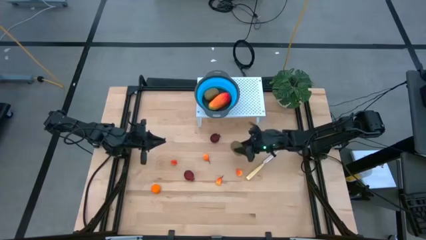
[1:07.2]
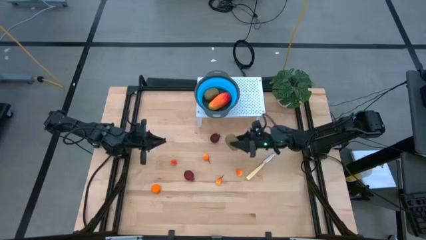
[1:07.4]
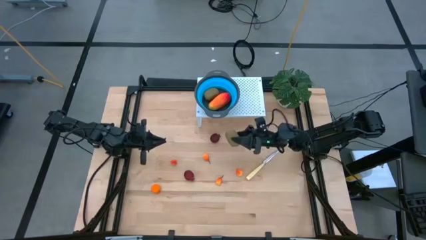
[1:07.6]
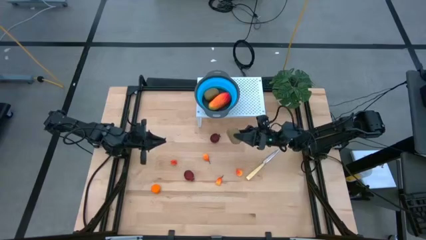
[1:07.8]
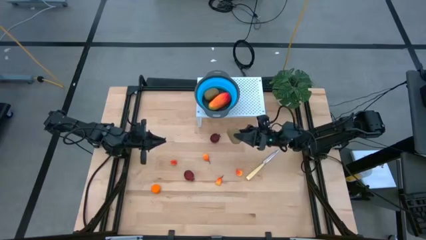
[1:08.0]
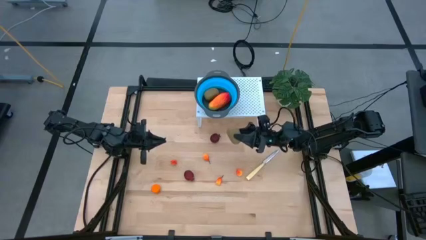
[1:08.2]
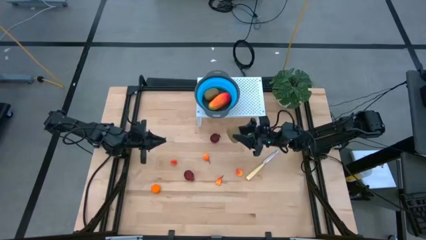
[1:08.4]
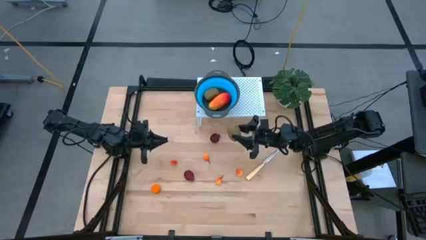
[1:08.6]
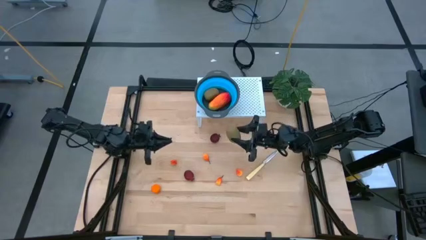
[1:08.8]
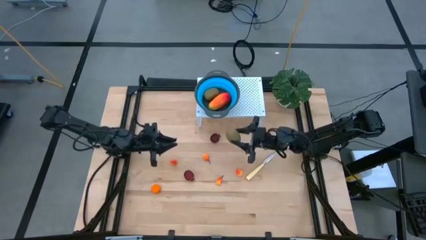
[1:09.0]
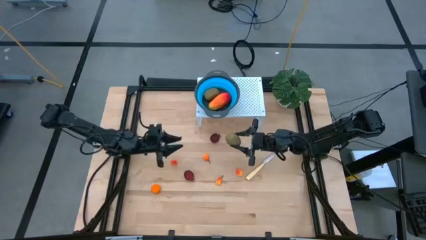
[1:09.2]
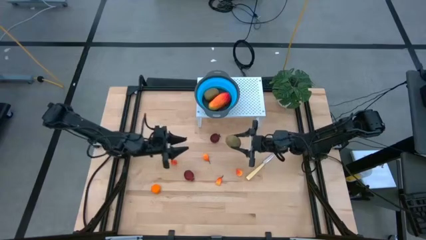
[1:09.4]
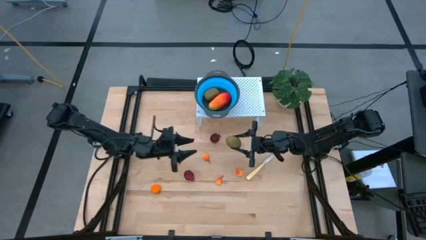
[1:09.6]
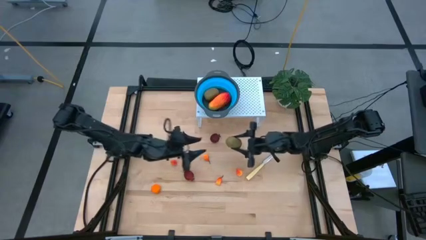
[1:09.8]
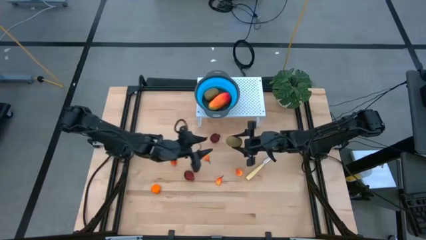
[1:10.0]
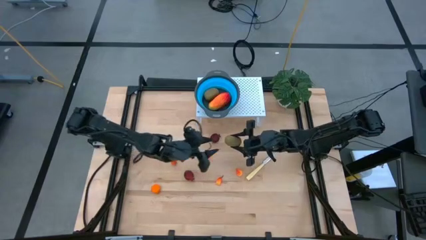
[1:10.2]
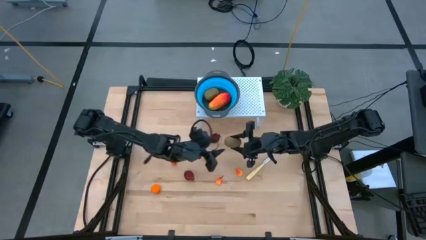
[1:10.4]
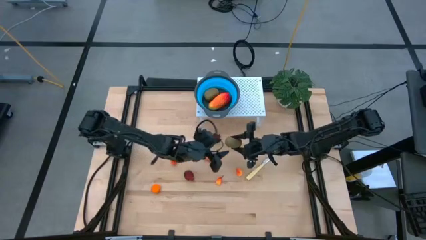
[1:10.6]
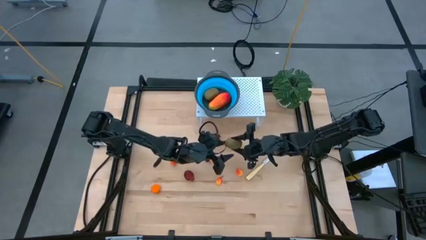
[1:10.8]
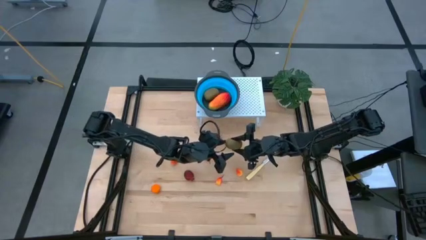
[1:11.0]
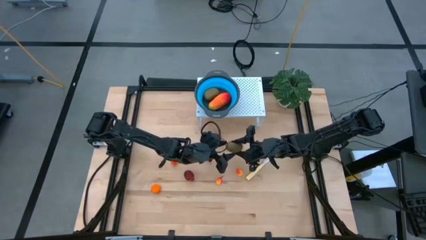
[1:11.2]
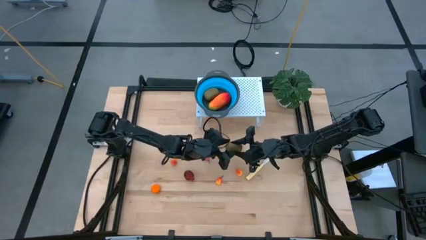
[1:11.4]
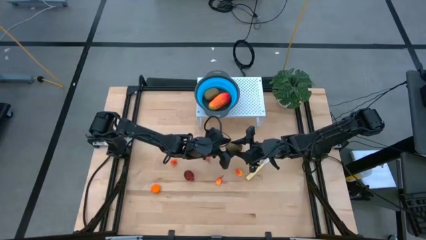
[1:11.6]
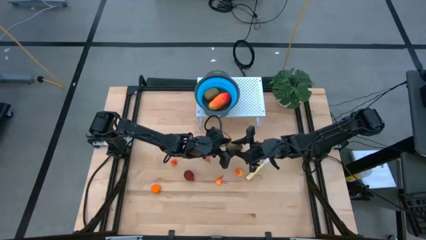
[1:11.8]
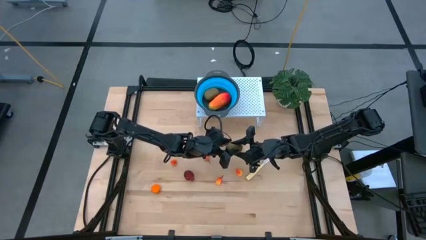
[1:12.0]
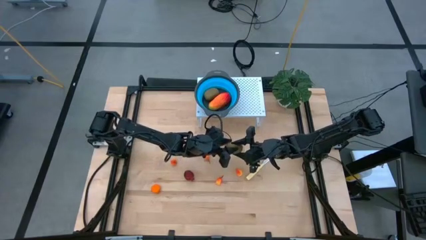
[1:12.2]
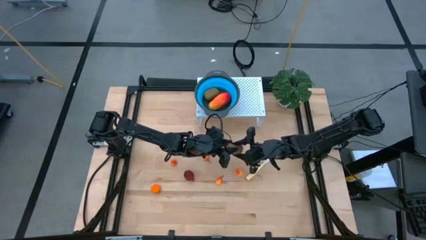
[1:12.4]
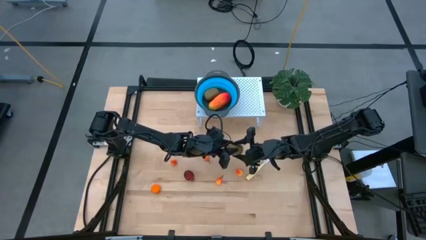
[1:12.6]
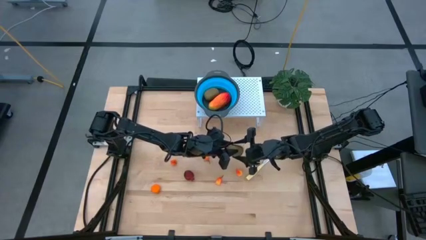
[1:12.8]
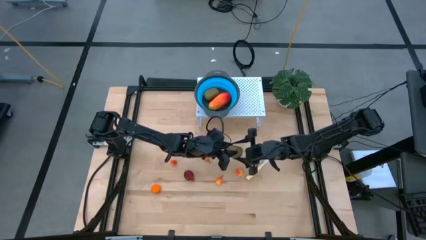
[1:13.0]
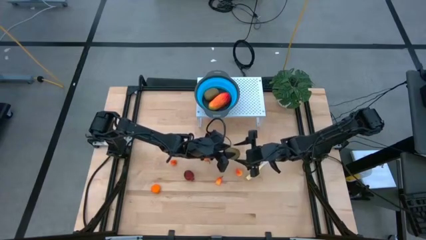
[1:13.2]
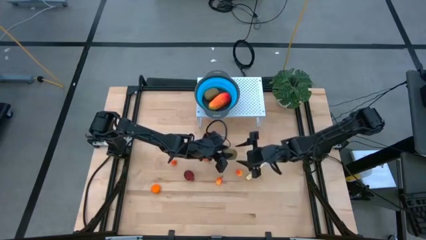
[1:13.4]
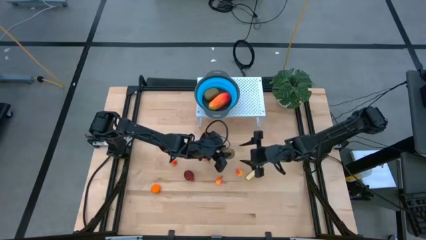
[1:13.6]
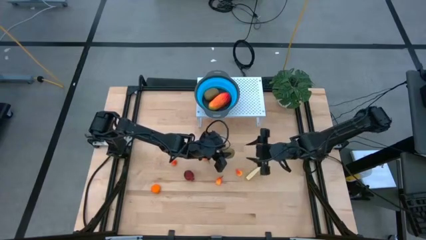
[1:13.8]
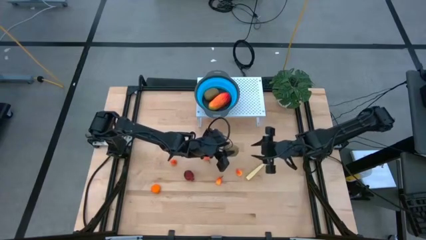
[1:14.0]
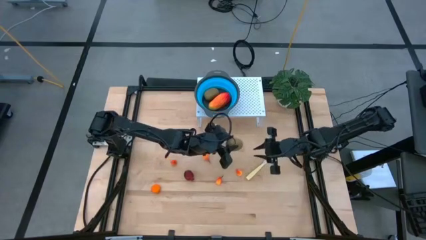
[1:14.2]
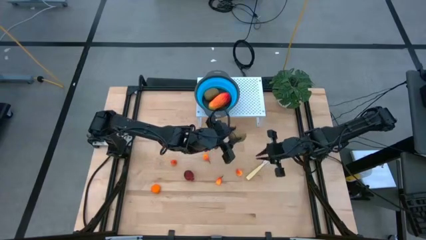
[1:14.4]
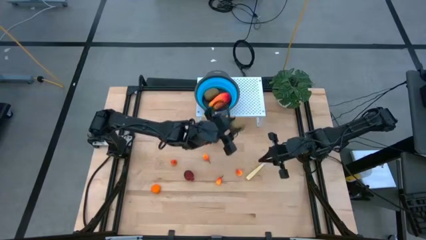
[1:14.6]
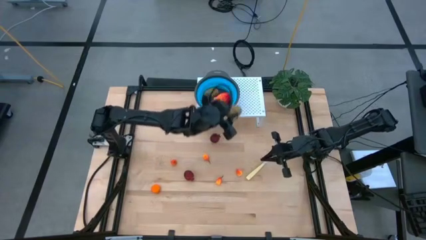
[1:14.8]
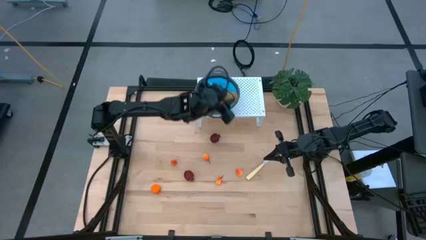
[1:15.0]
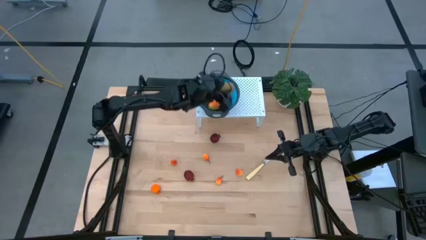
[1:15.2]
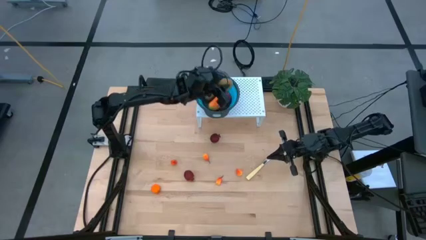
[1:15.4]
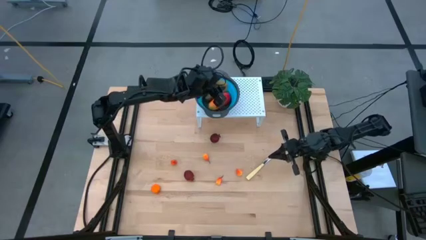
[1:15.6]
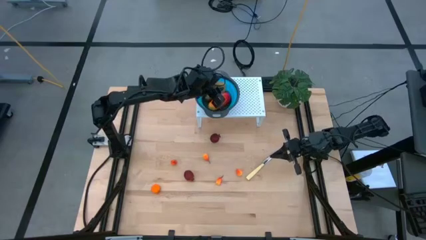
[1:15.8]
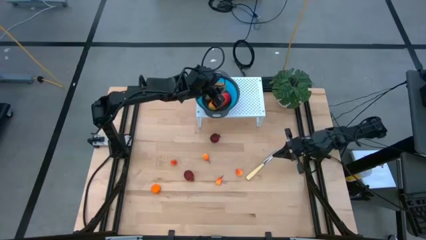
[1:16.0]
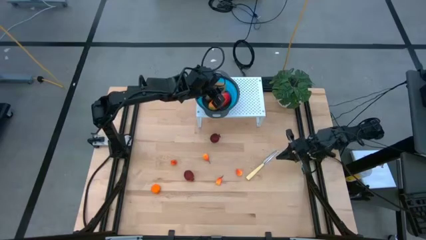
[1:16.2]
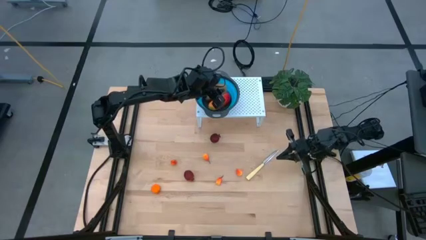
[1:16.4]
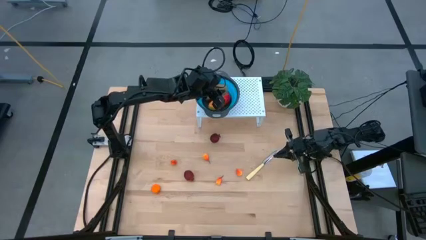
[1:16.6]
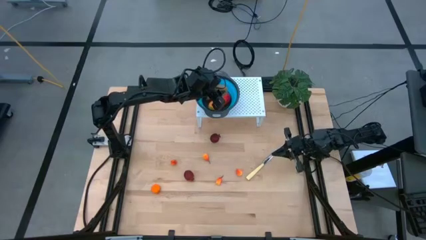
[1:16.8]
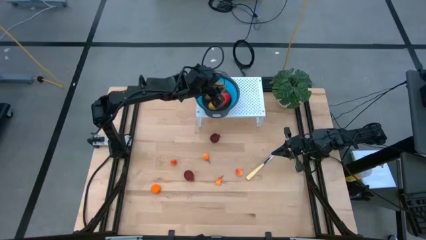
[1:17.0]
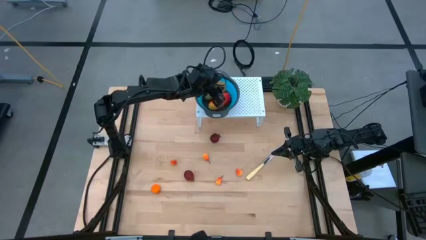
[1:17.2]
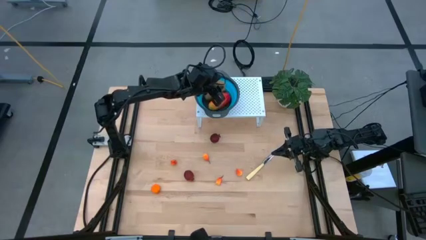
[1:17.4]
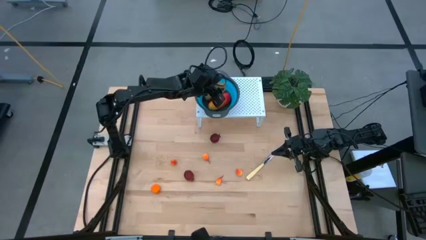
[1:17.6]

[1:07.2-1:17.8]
Task: Pick & Place Fruit
Put the kiwi into the blue strainer bowl on the shelf
